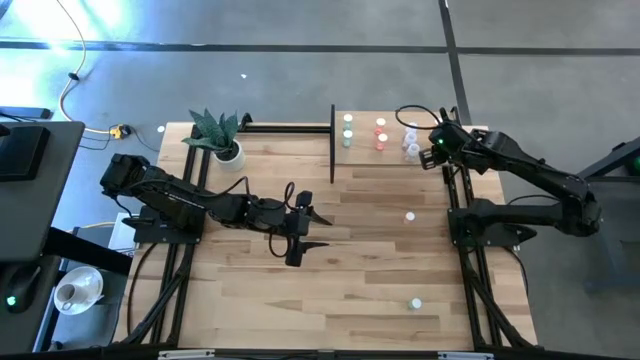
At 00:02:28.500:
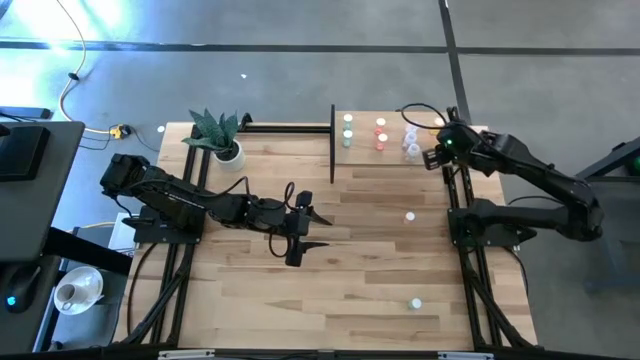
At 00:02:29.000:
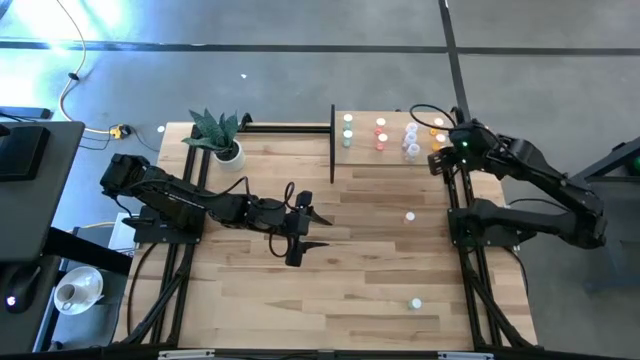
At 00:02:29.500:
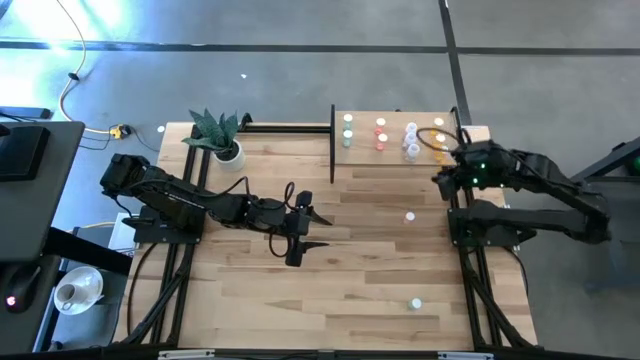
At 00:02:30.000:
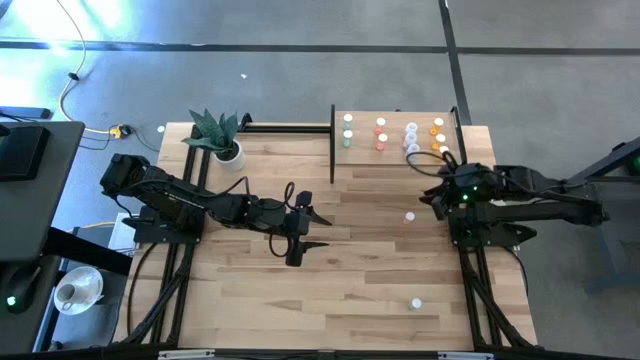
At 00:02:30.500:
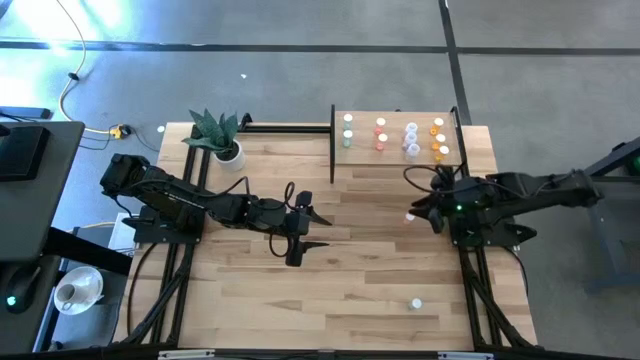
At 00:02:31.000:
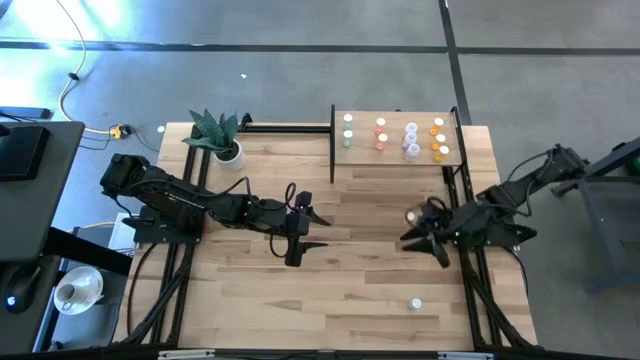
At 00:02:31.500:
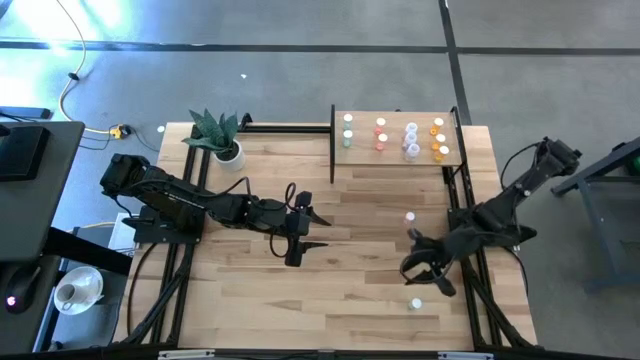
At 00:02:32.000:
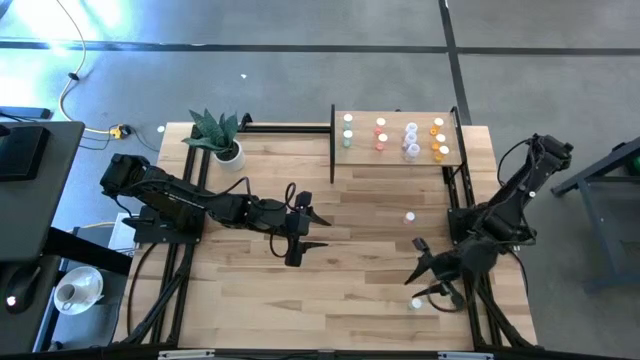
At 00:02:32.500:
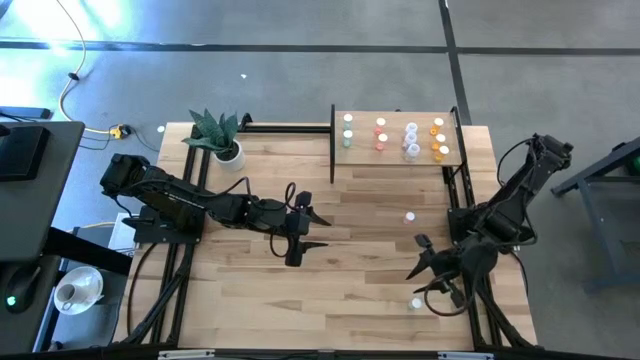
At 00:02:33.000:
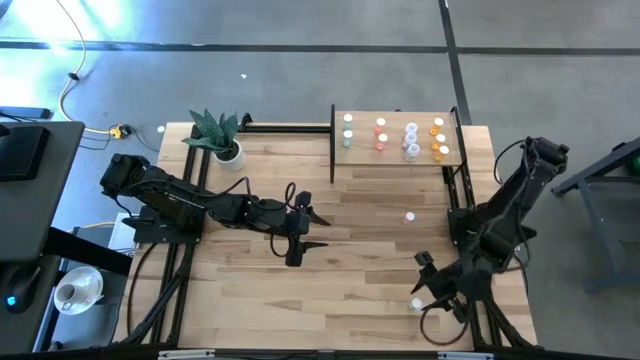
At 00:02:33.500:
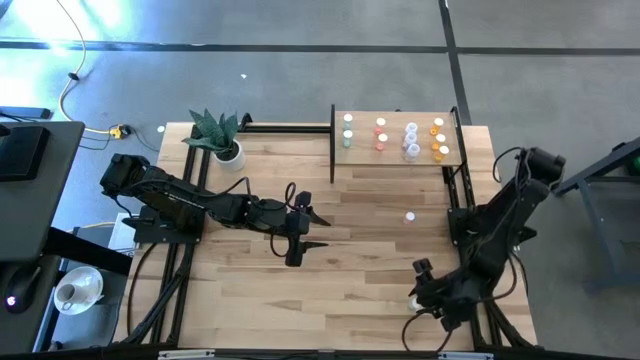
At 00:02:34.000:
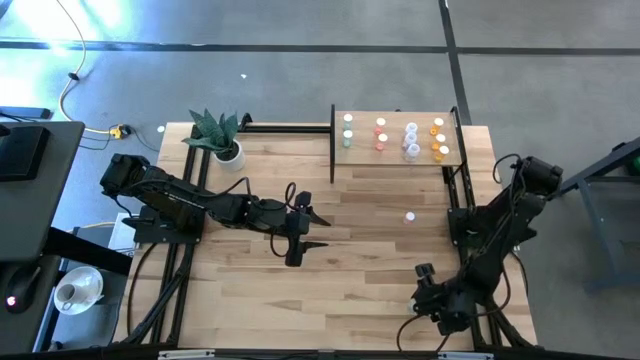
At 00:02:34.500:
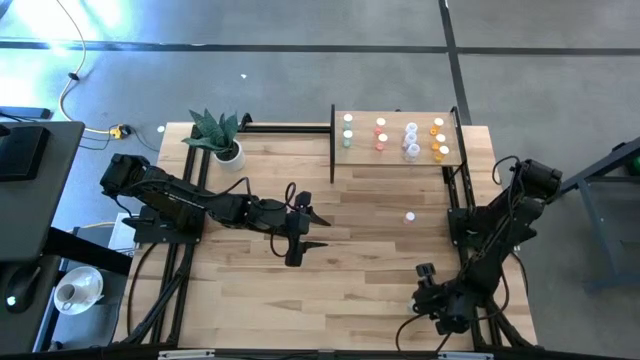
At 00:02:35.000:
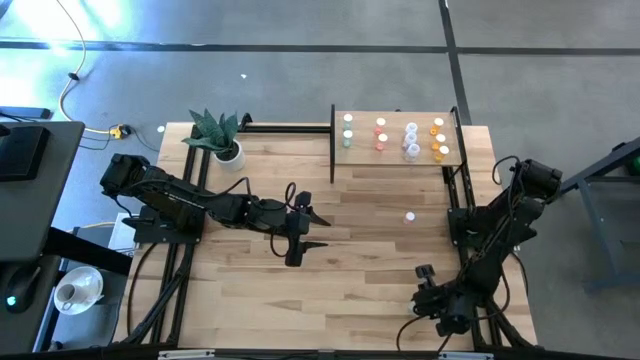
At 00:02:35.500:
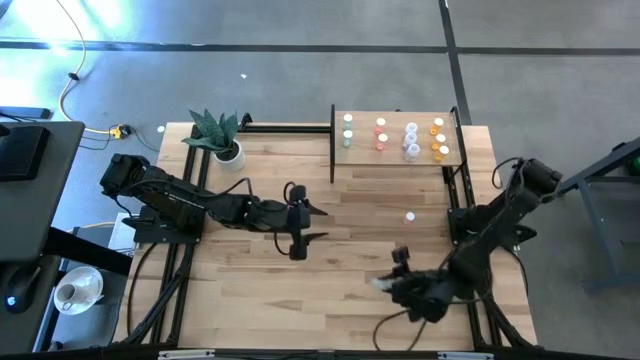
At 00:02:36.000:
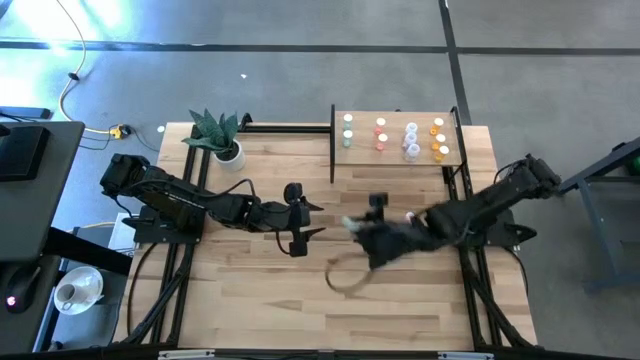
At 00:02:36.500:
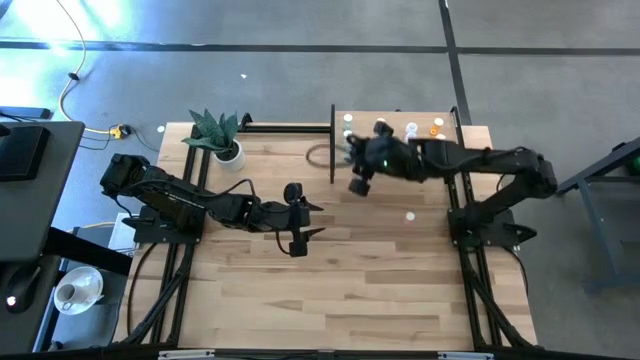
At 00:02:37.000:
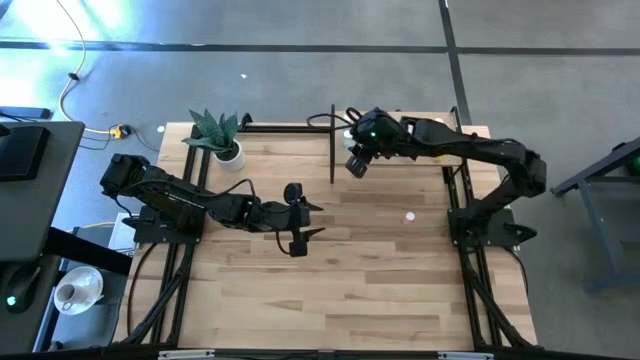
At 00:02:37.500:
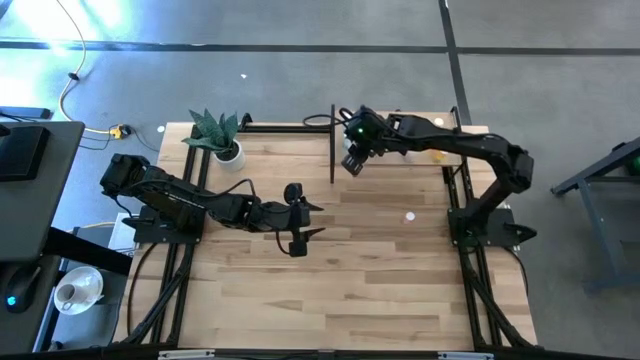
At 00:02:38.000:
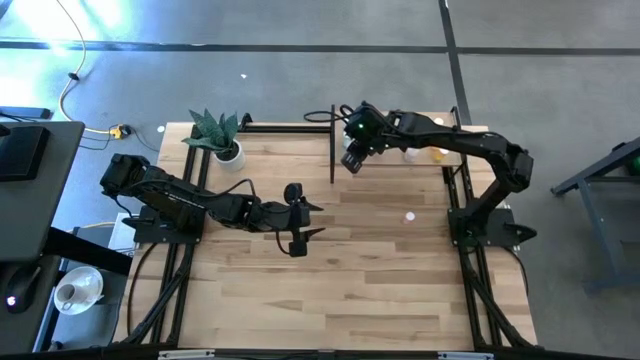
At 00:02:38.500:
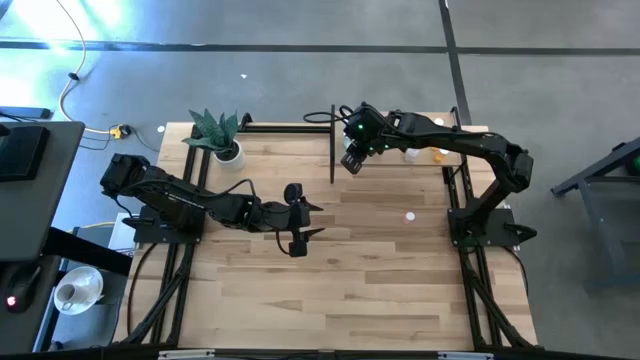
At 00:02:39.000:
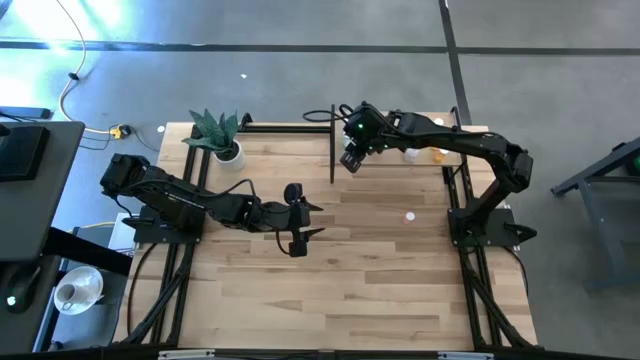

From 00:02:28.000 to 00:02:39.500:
Task: Pick and place medicine bottles onto shelf by color
Put the green pill bottle on the shelf aligned with the other green pill bottle

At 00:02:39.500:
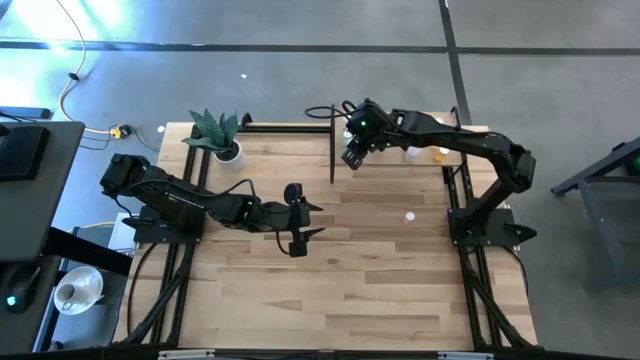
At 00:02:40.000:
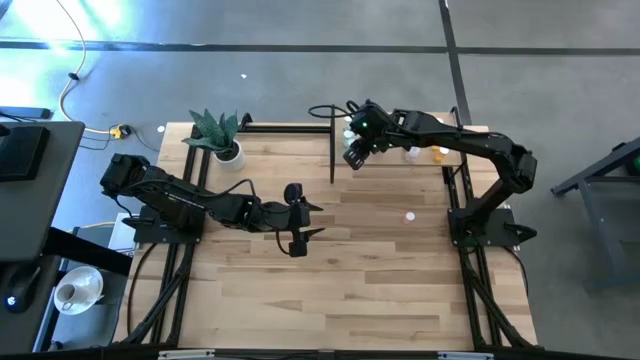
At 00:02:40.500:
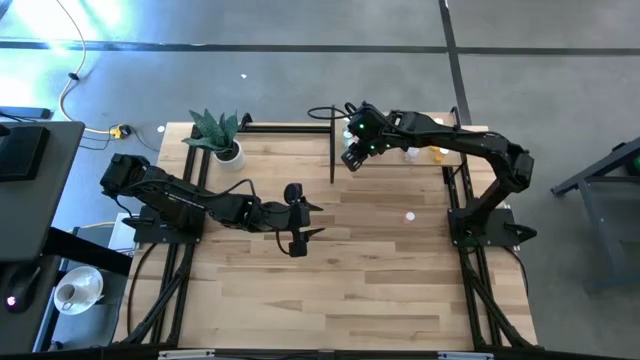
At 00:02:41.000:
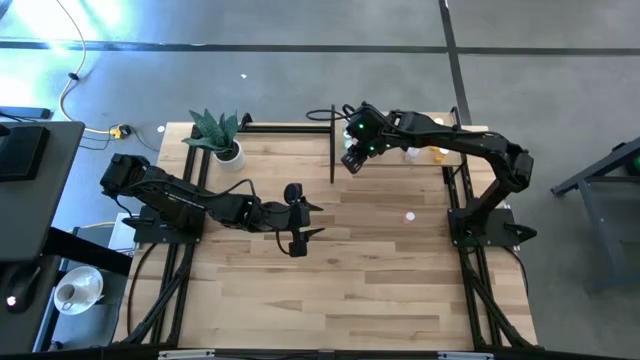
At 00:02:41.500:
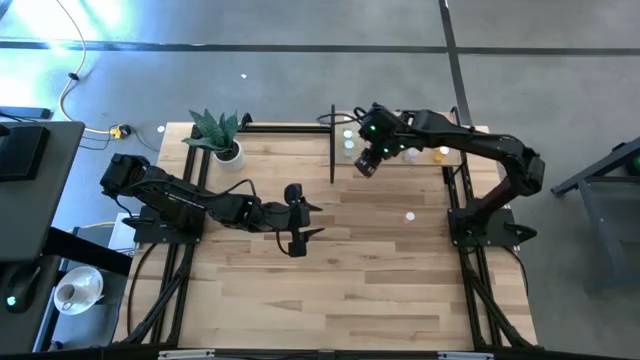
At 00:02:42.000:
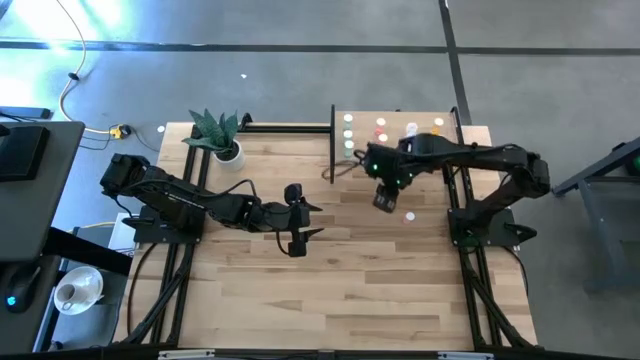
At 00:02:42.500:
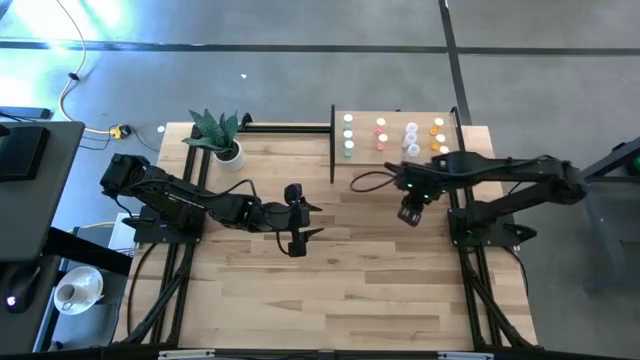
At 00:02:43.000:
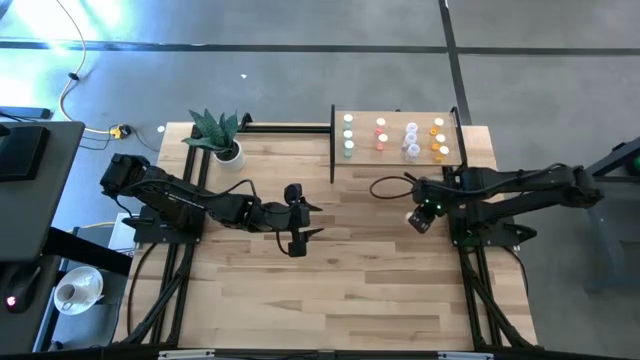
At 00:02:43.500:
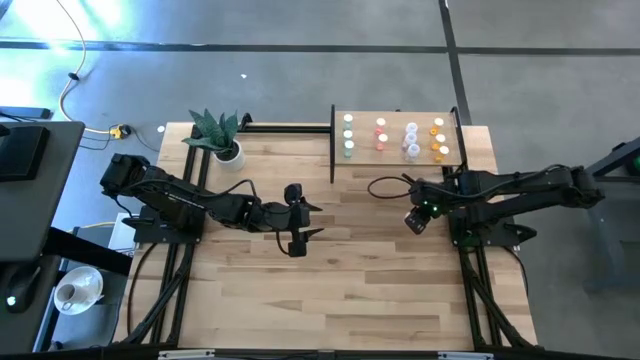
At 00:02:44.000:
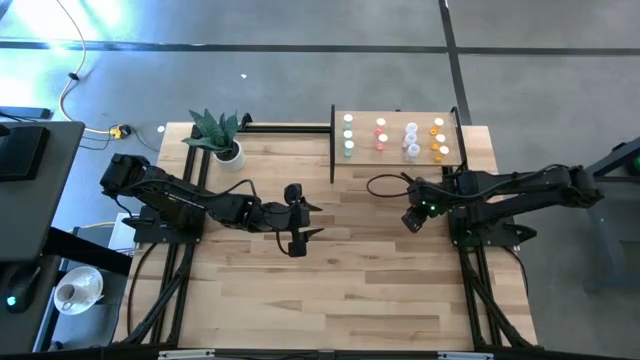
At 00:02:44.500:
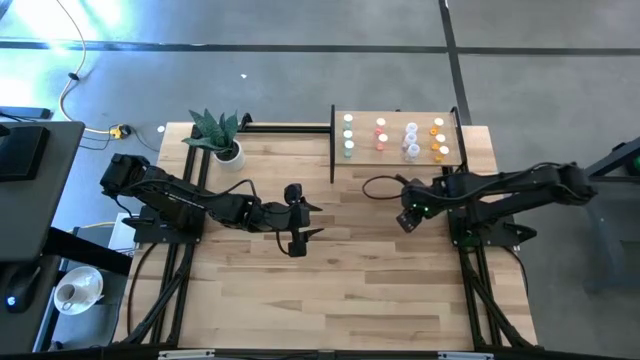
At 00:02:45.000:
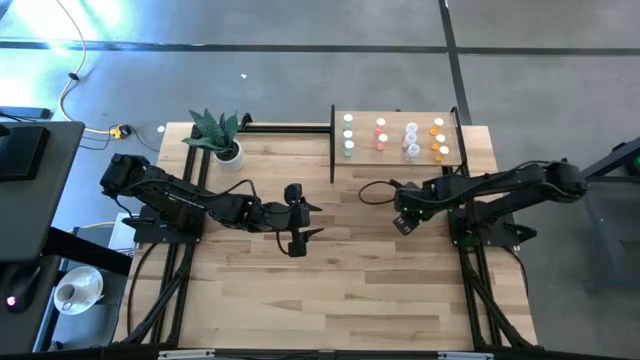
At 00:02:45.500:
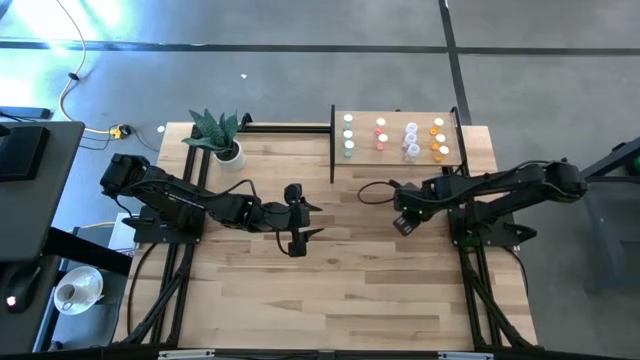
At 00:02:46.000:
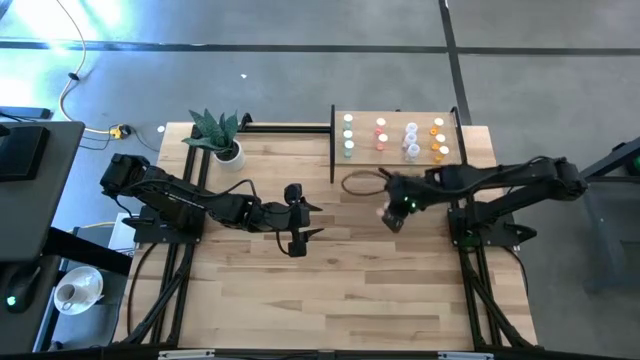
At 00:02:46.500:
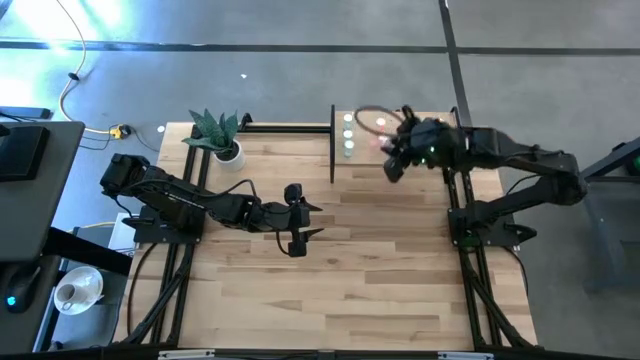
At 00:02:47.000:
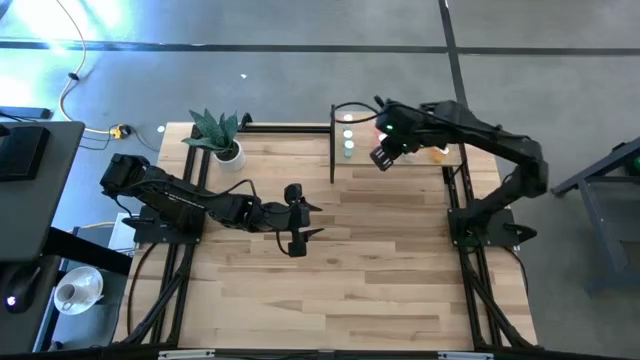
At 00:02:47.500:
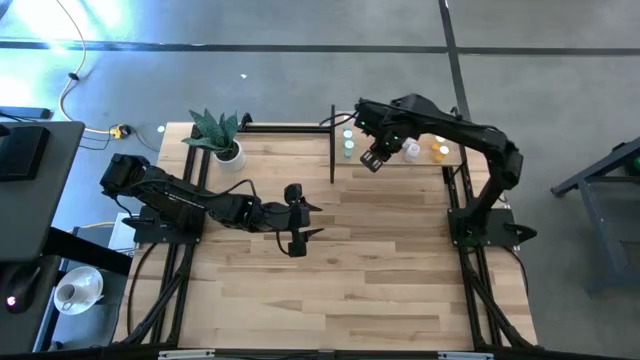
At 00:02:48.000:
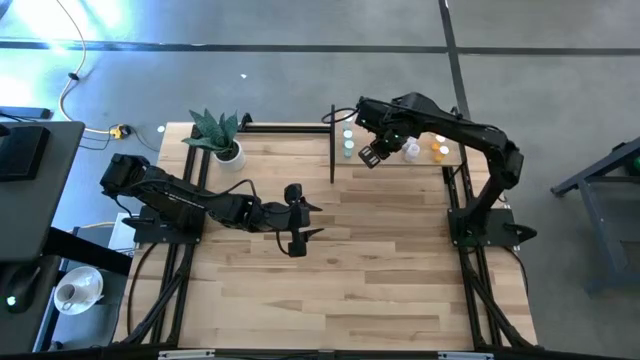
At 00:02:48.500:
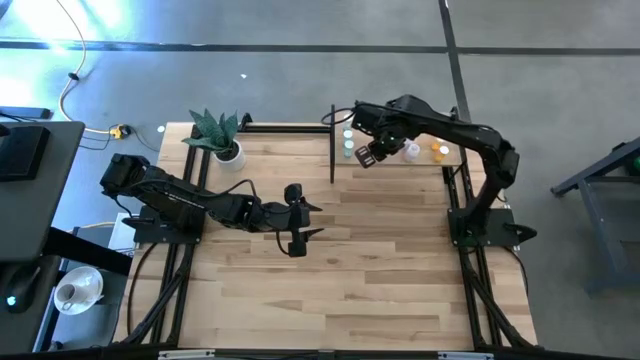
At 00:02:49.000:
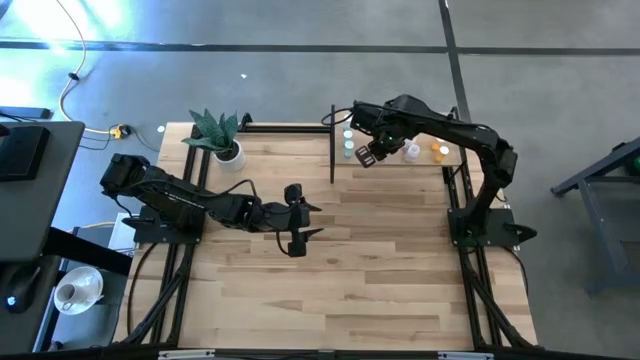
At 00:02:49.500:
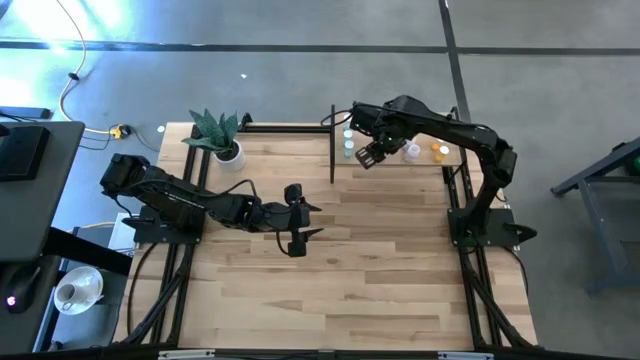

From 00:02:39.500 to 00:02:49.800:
Put the pink pill bottle on the shelf aligned with the pink pill bottle
